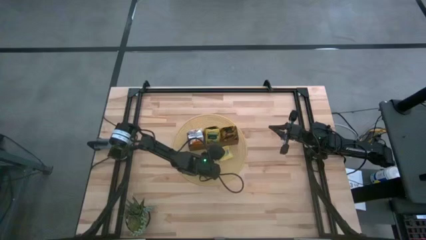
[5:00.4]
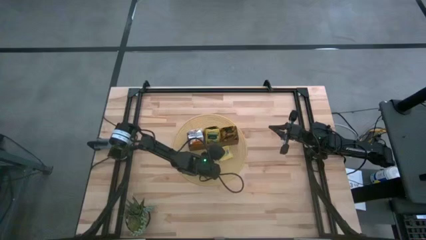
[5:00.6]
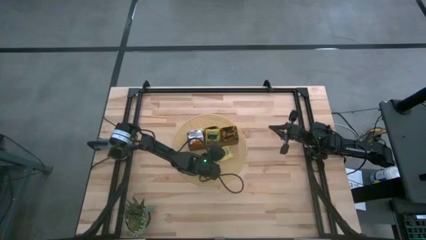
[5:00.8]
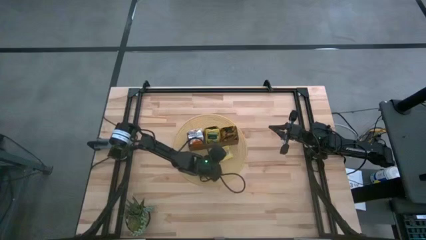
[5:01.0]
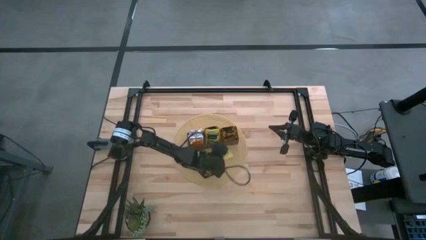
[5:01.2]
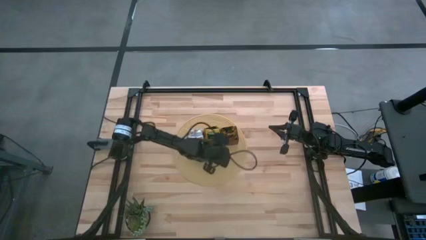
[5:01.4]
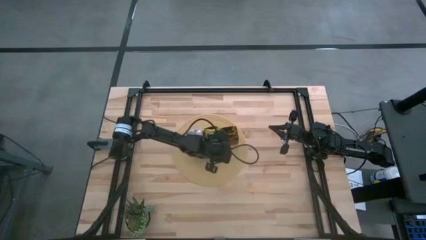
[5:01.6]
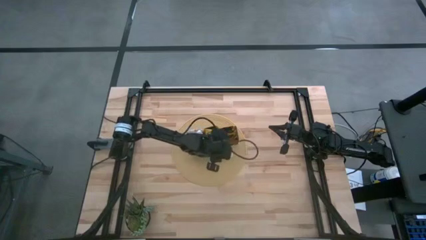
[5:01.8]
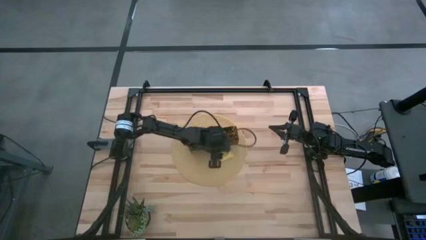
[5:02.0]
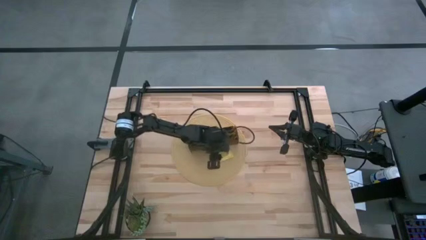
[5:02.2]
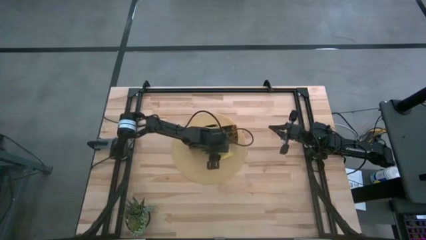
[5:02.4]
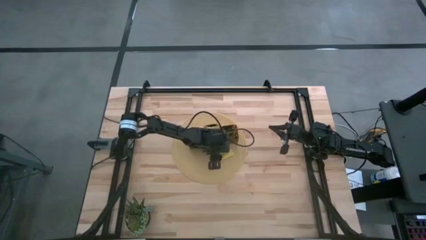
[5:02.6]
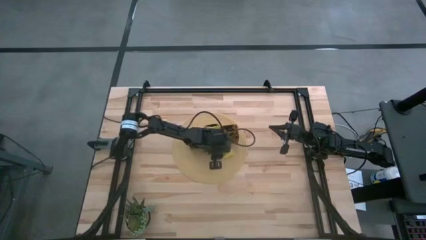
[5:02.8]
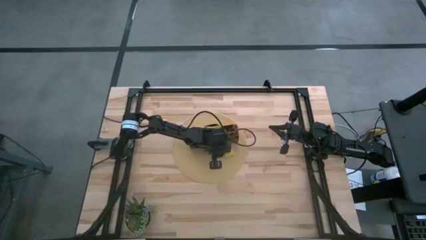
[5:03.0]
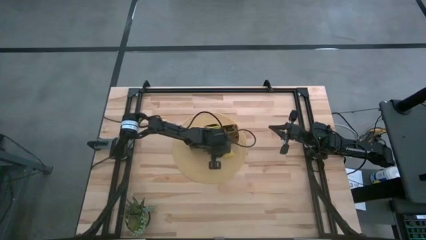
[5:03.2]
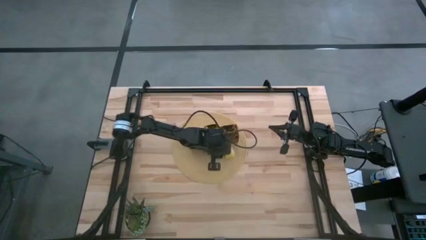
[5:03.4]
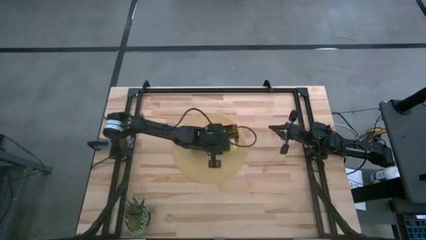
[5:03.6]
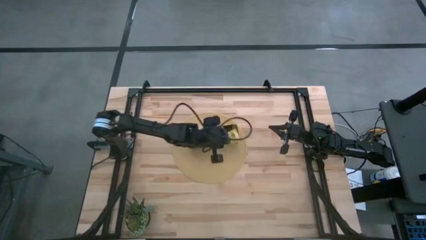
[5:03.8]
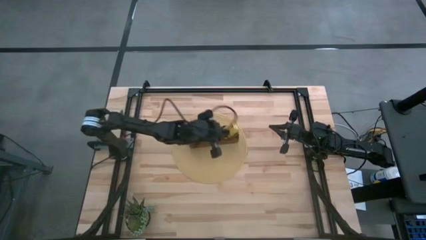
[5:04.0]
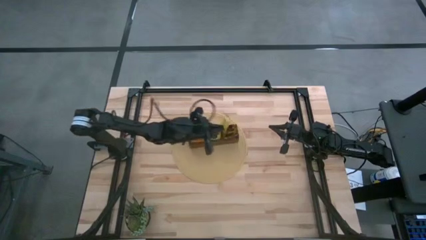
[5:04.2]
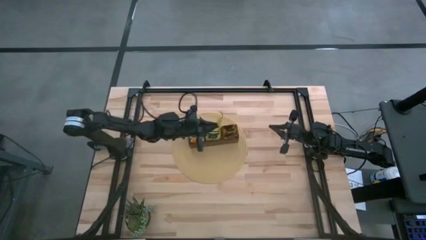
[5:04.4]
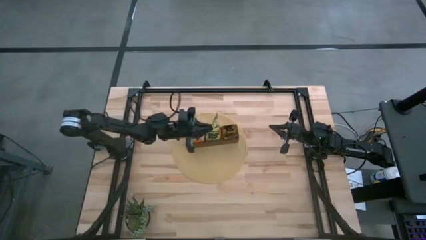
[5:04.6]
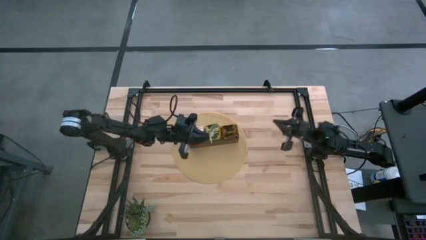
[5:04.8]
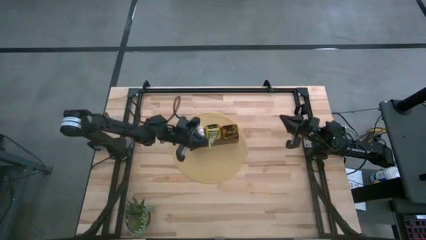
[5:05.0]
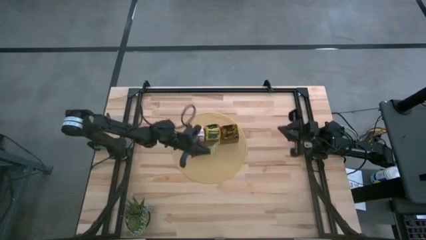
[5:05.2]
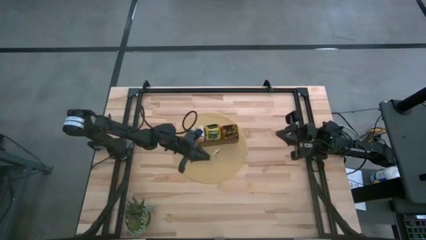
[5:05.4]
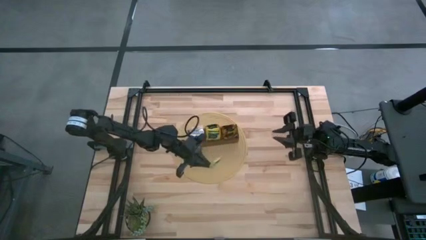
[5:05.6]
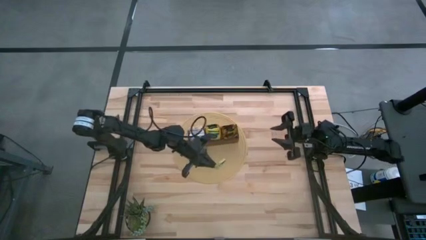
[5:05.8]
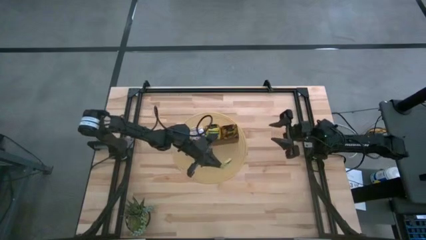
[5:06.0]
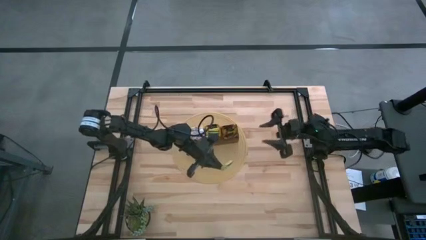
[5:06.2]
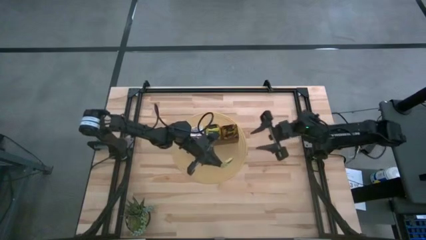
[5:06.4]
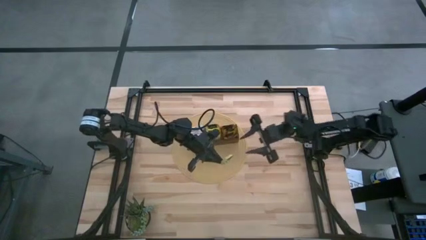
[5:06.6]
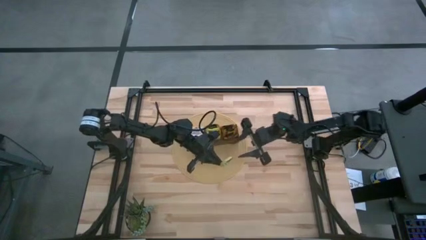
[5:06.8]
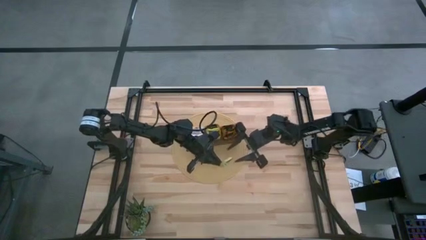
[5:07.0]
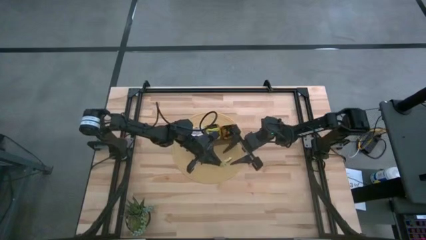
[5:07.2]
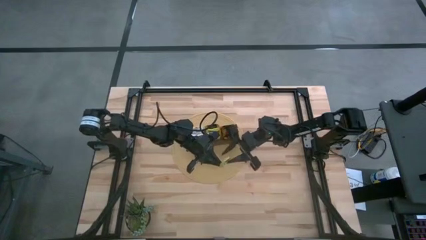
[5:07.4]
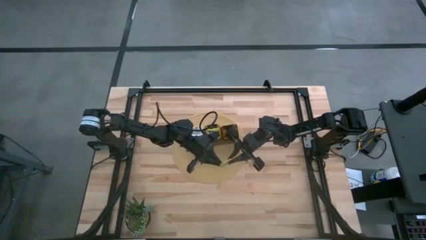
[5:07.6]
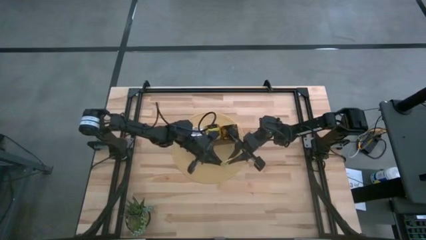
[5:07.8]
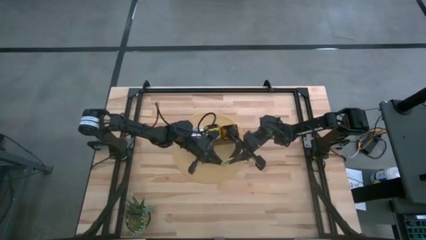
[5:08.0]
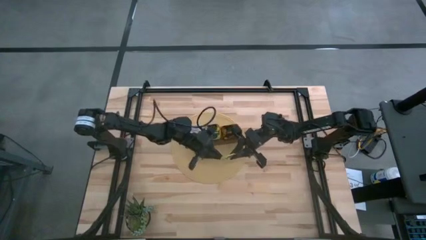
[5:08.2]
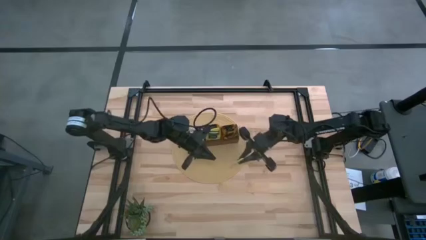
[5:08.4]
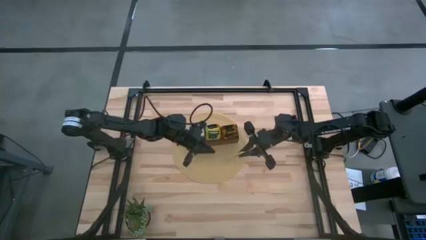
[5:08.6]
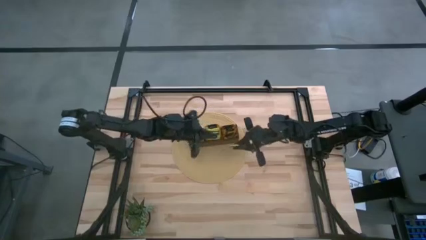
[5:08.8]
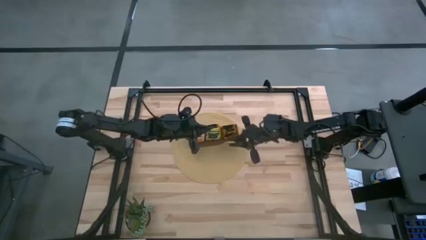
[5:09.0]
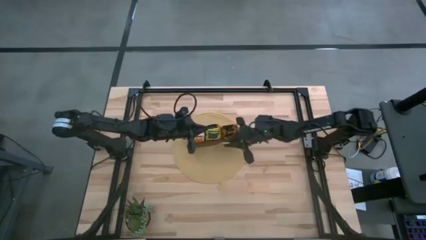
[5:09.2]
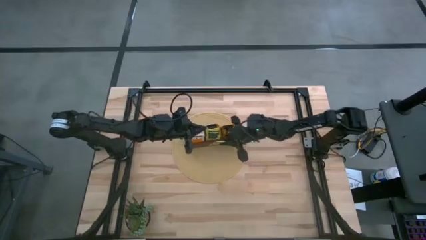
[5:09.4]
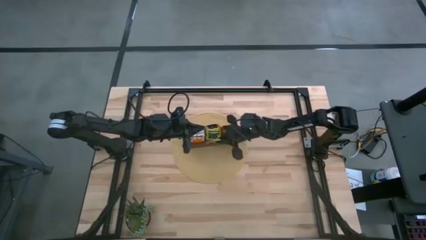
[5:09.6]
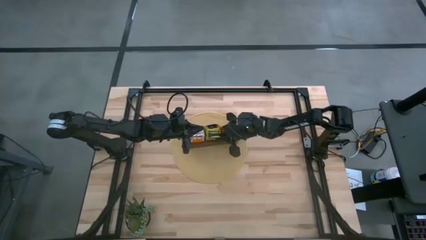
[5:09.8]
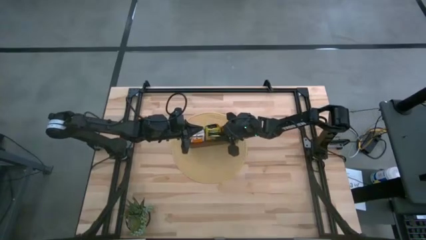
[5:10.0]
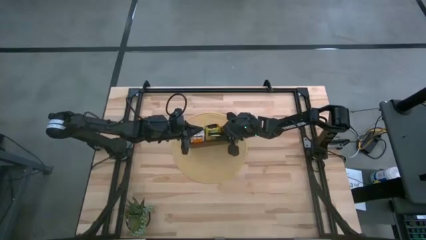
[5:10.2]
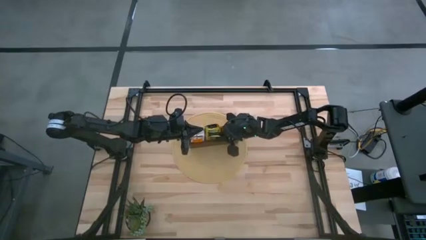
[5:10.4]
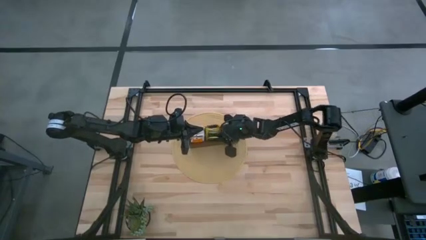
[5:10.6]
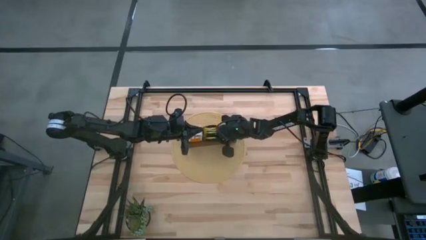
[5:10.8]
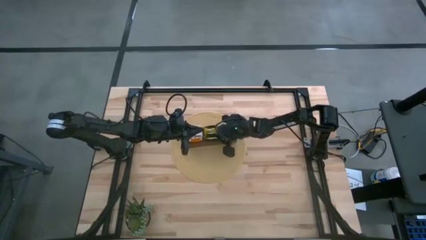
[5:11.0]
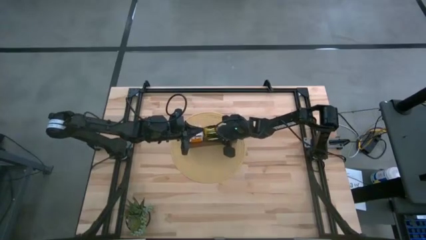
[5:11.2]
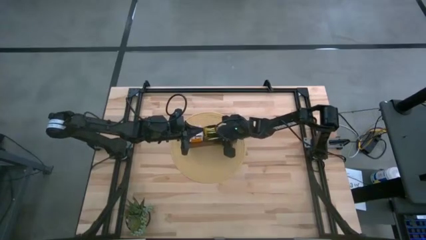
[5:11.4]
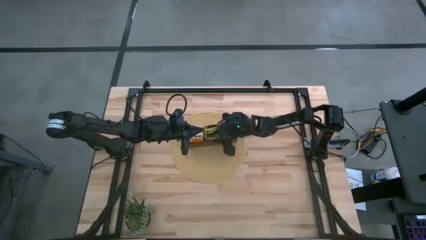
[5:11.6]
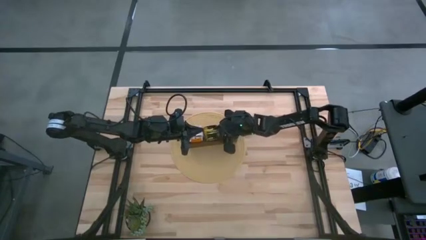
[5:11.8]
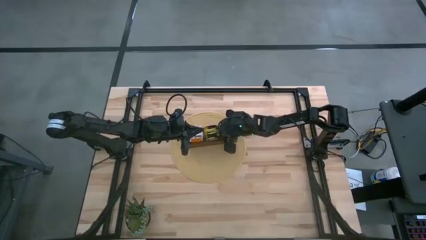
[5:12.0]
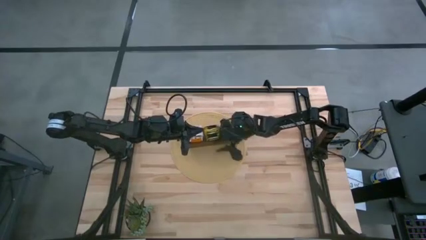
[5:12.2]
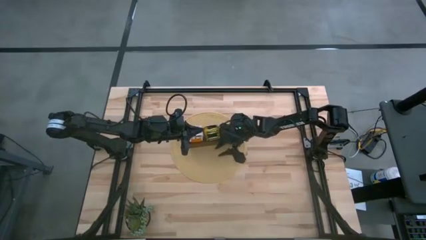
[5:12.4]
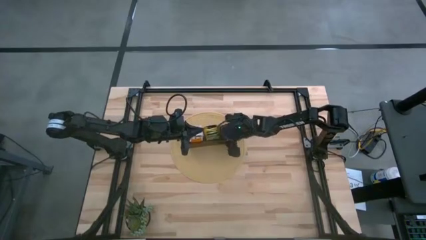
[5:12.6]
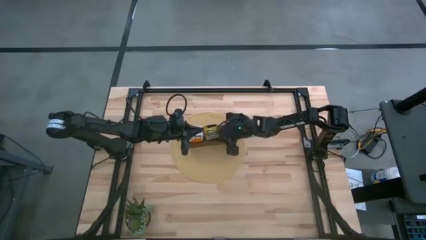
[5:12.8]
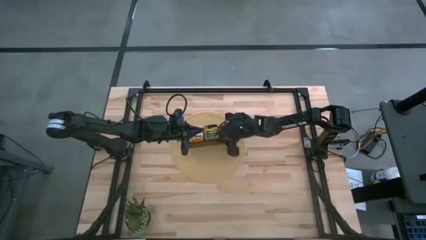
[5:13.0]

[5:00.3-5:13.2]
Task: Pick & Place Tea
Put the yellow tea bag into the wooden organizer

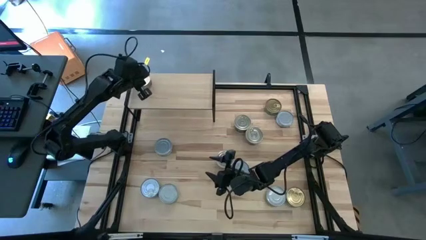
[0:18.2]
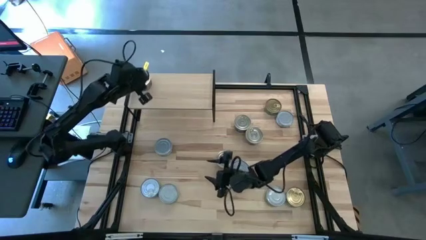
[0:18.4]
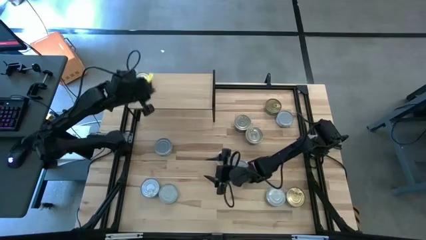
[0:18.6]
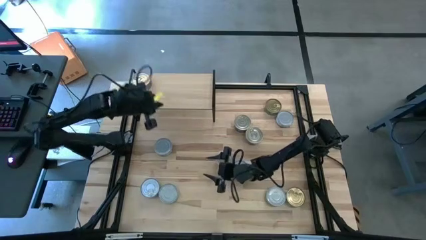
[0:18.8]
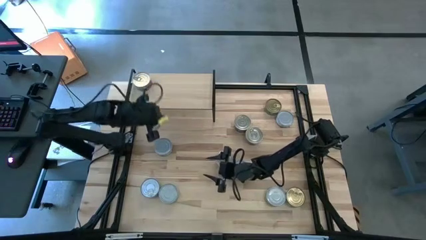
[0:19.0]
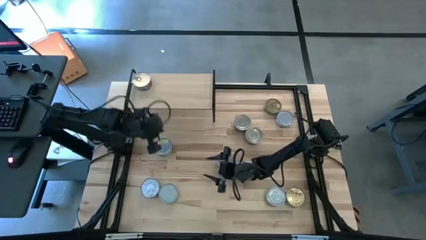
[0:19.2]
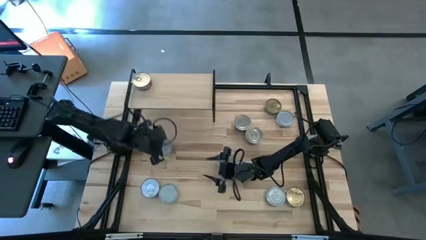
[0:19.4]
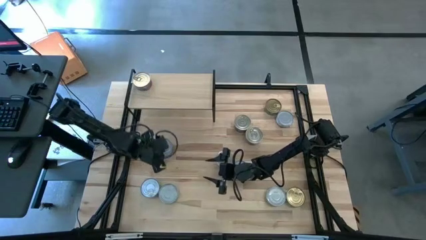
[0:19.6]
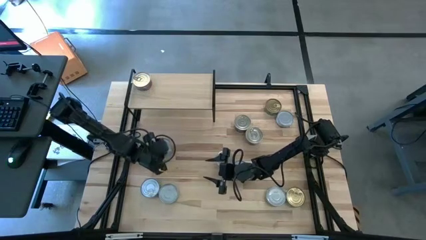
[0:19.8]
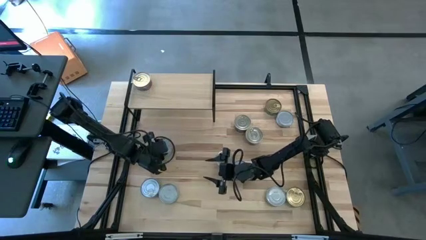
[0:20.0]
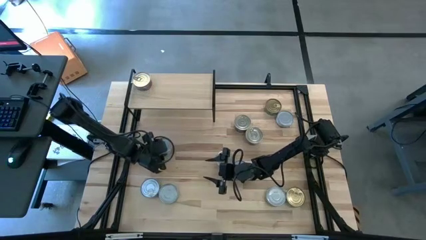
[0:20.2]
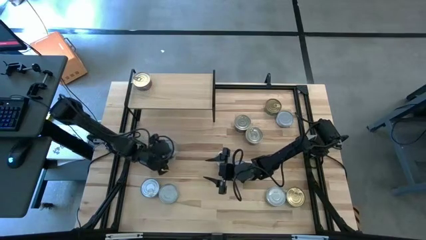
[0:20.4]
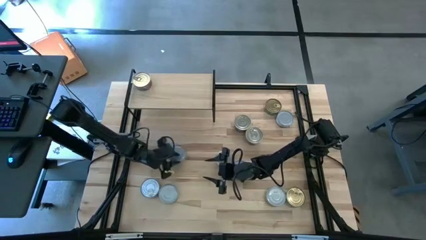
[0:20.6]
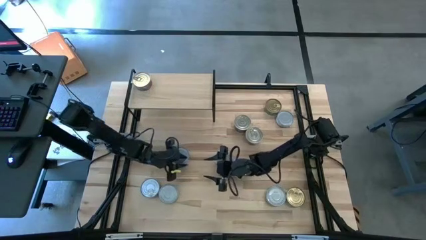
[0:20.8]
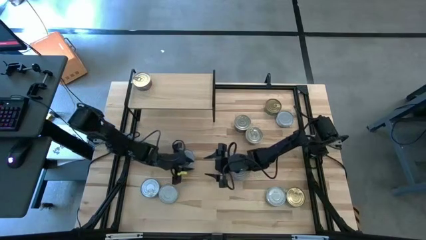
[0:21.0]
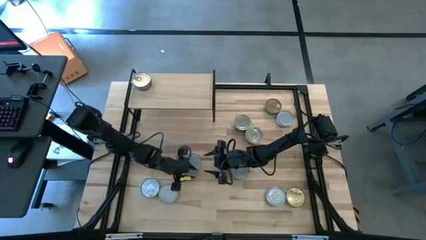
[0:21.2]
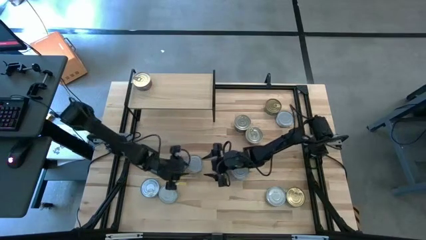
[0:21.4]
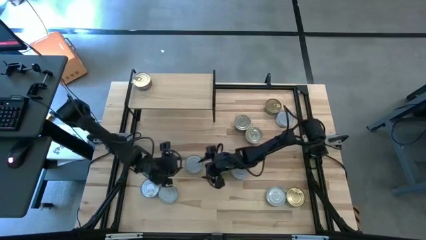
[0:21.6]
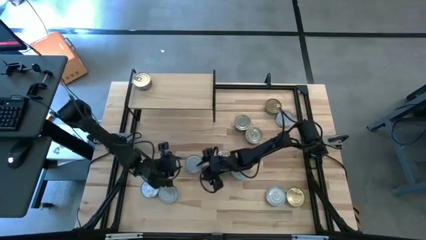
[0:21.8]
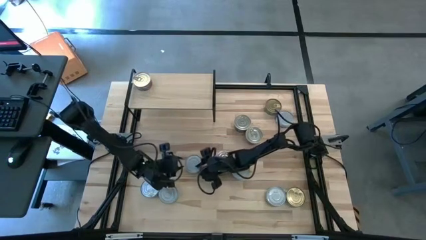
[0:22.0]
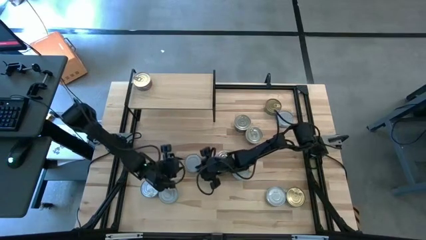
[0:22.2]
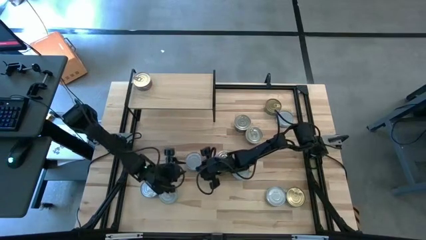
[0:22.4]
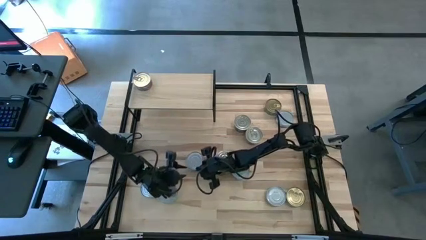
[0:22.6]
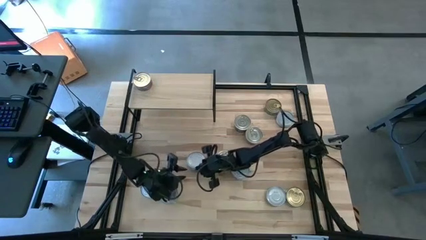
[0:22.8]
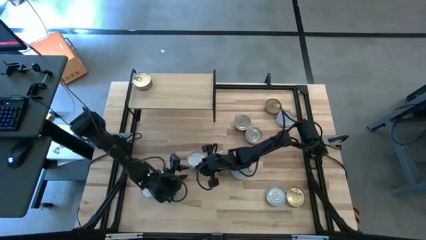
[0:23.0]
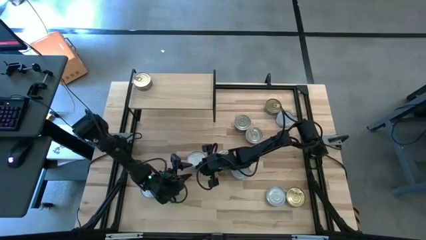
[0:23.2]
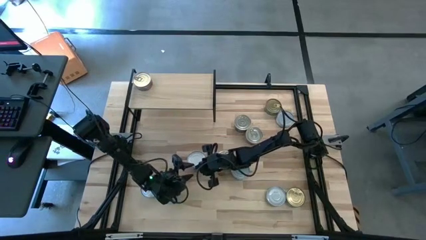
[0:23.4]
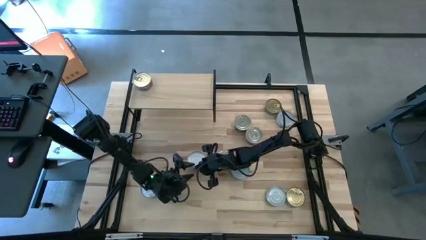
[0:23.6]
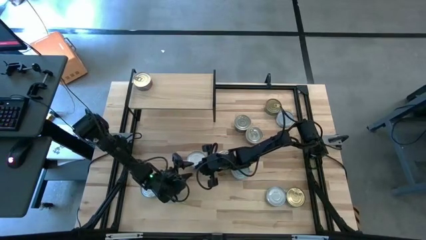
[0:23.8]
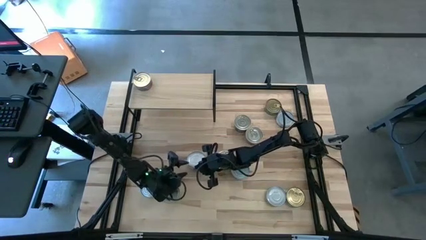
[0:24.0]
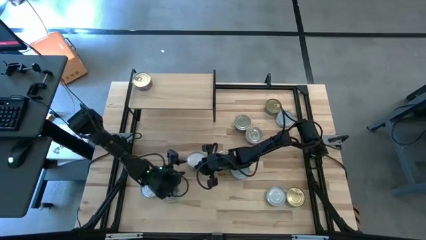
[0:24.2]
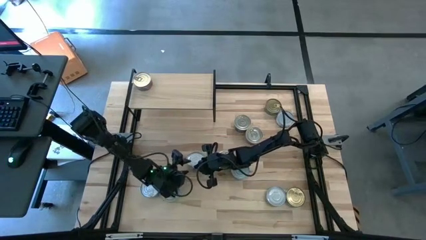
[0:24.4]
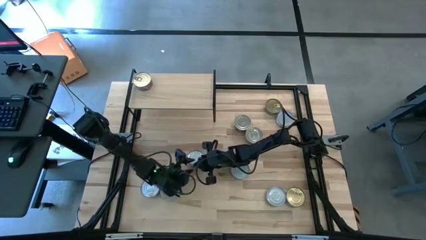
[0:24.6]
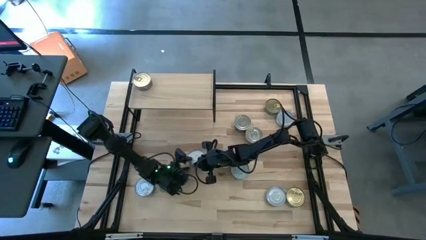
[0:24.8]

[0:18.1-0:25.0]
Task: Stack canned seafood by type on shelf
Put the green white tuna can on the shelf
